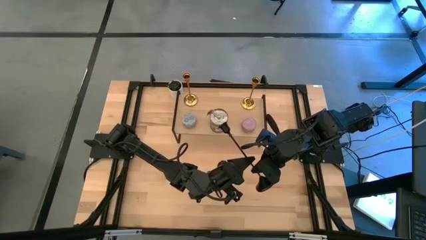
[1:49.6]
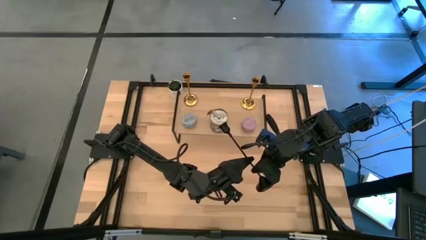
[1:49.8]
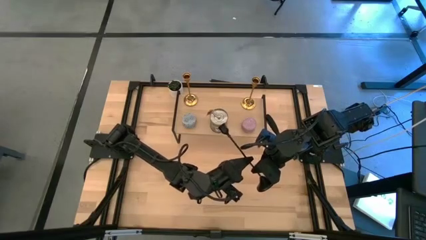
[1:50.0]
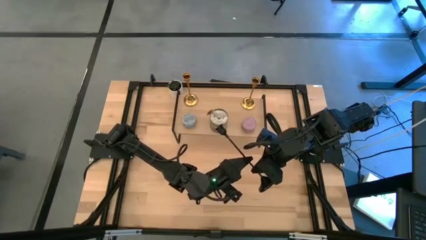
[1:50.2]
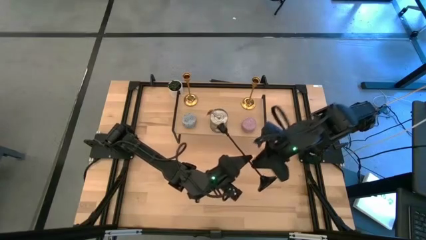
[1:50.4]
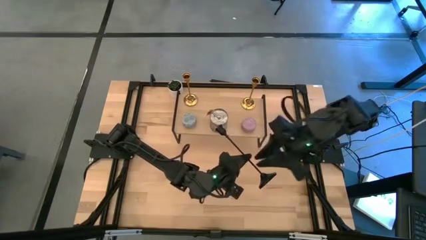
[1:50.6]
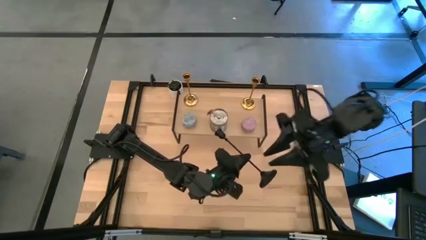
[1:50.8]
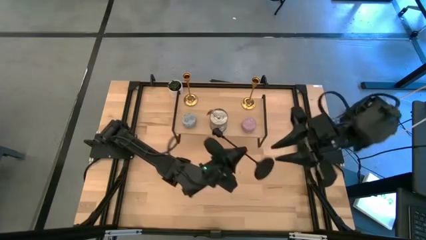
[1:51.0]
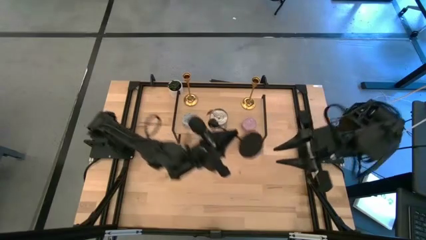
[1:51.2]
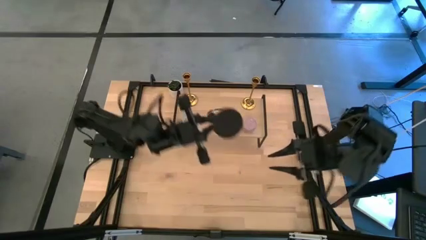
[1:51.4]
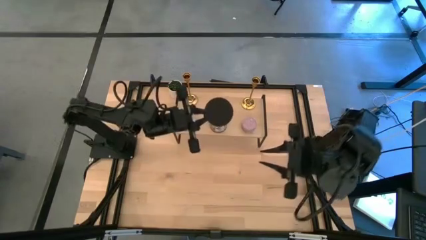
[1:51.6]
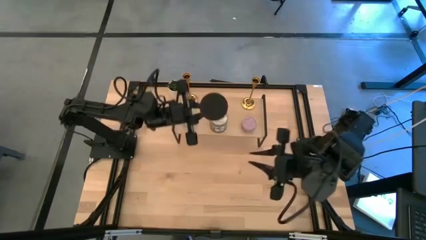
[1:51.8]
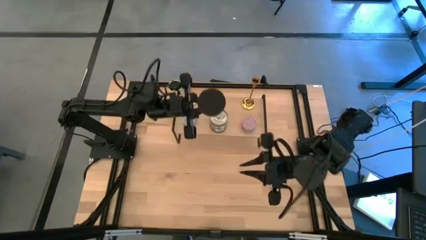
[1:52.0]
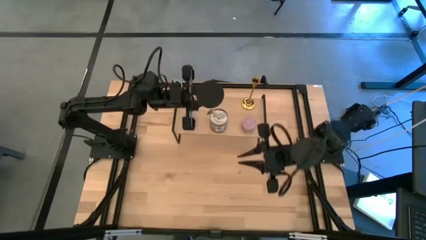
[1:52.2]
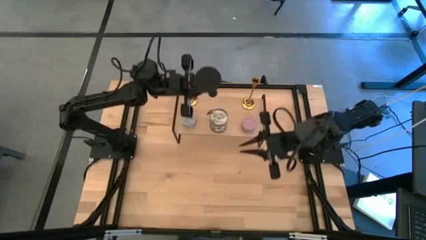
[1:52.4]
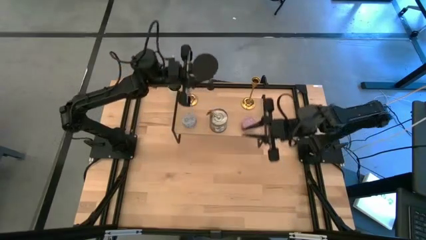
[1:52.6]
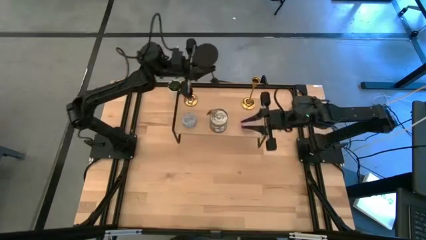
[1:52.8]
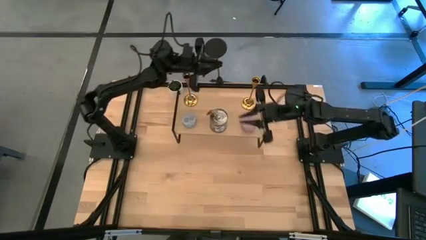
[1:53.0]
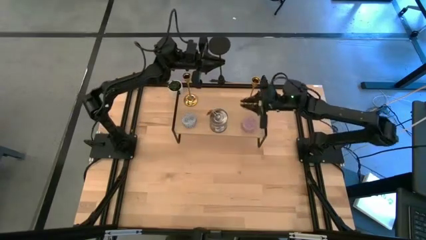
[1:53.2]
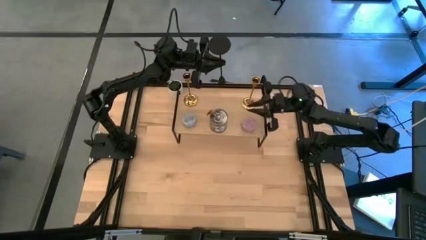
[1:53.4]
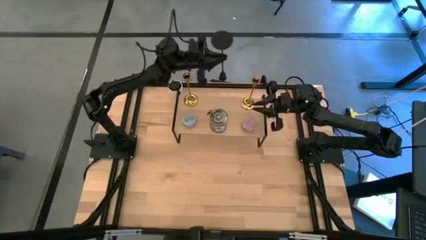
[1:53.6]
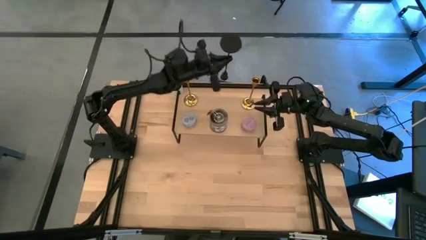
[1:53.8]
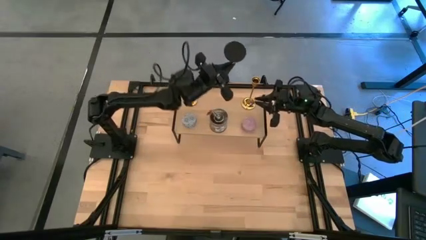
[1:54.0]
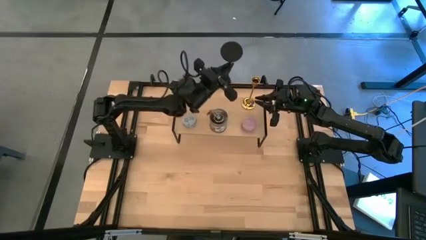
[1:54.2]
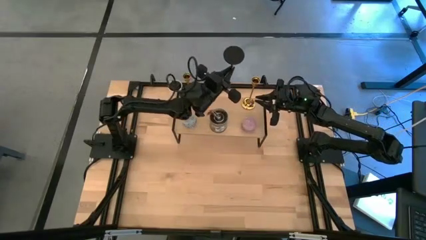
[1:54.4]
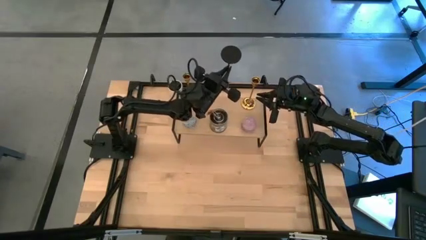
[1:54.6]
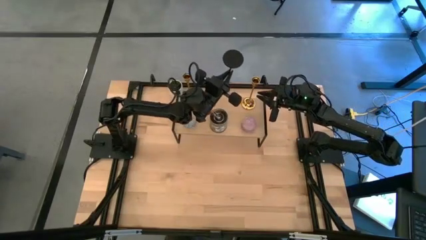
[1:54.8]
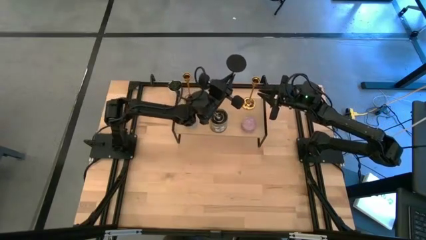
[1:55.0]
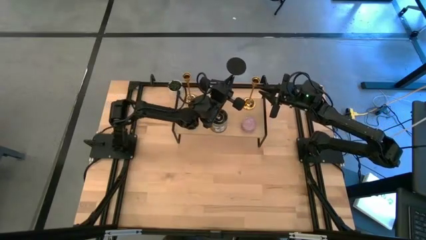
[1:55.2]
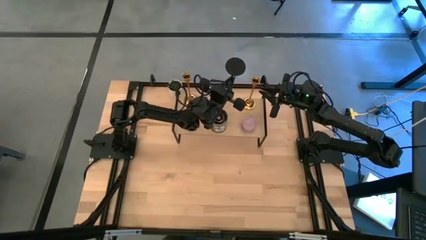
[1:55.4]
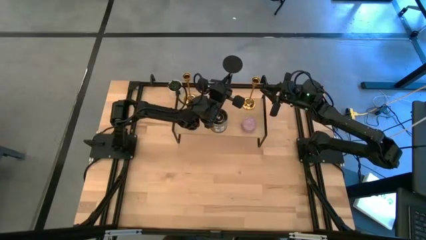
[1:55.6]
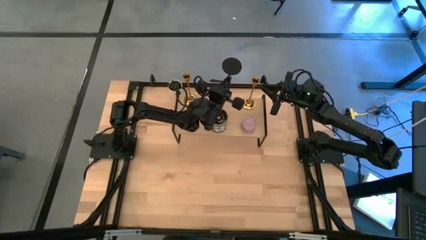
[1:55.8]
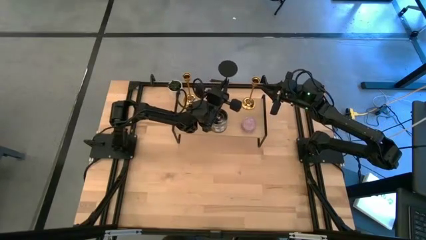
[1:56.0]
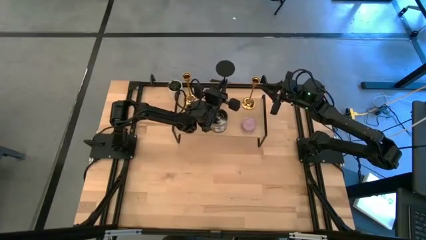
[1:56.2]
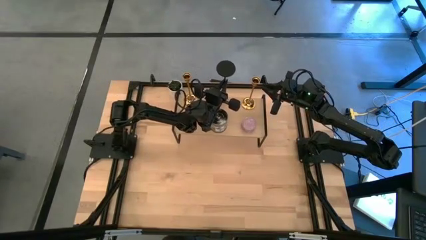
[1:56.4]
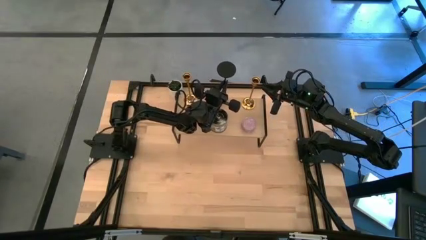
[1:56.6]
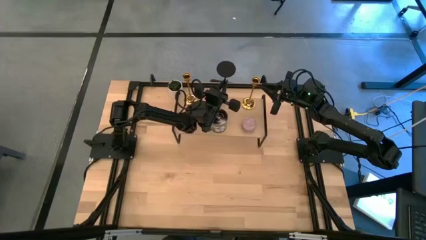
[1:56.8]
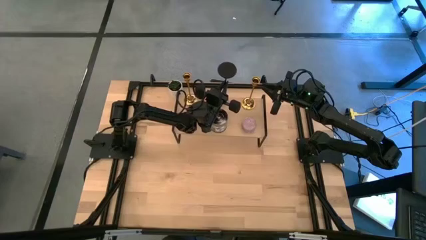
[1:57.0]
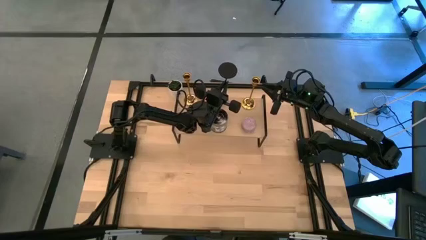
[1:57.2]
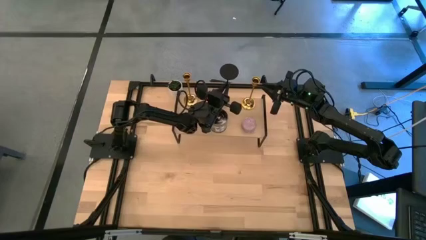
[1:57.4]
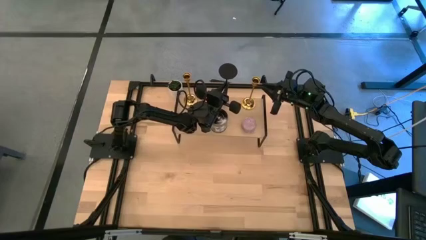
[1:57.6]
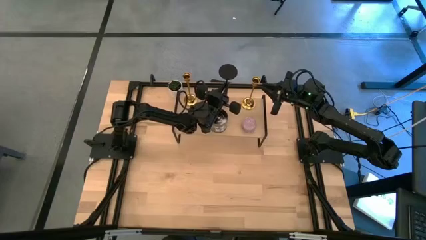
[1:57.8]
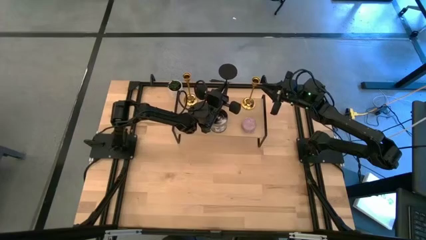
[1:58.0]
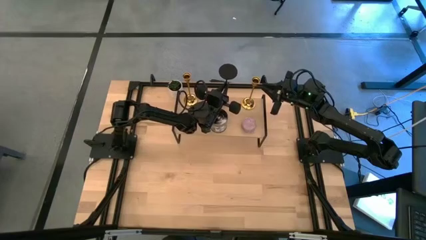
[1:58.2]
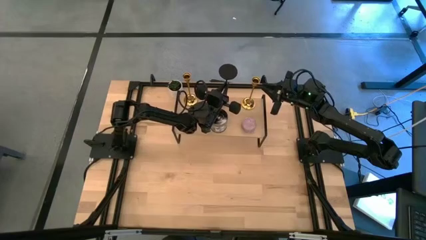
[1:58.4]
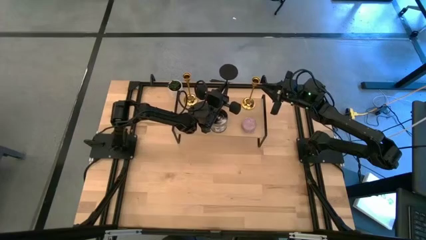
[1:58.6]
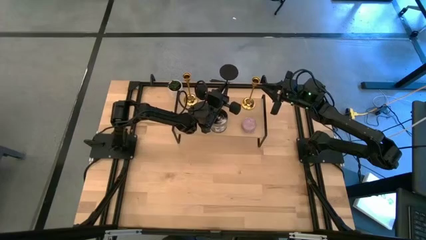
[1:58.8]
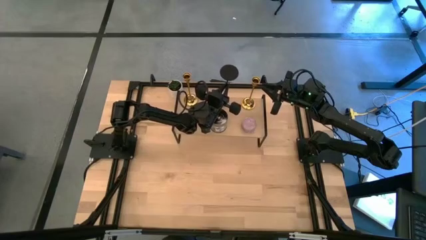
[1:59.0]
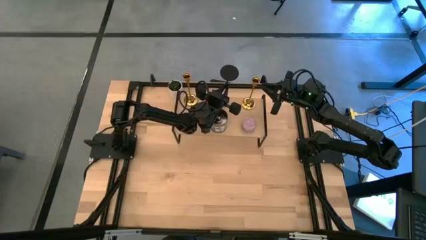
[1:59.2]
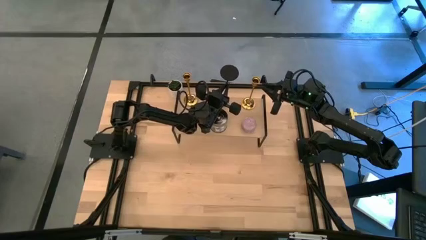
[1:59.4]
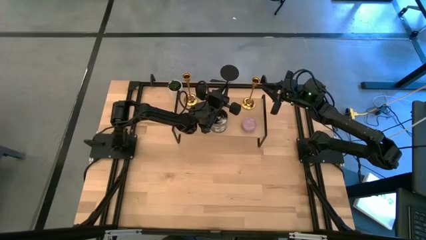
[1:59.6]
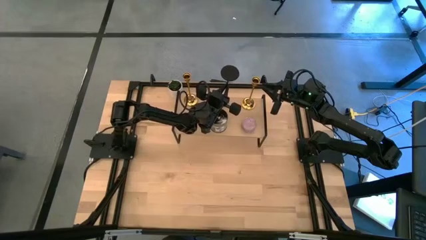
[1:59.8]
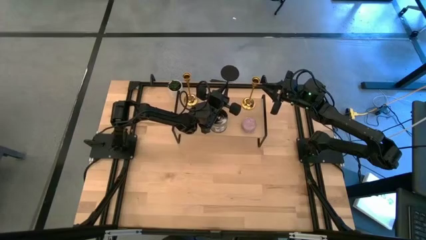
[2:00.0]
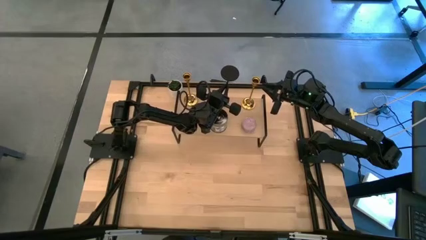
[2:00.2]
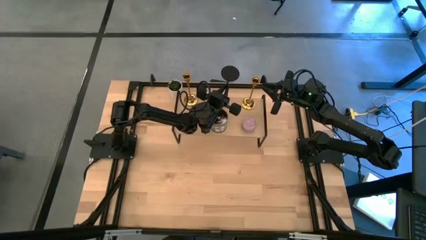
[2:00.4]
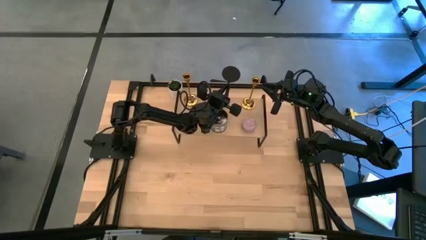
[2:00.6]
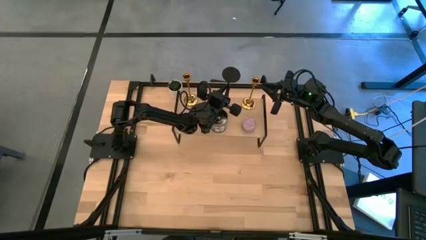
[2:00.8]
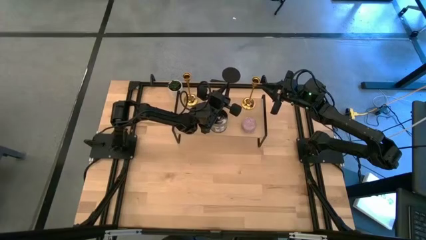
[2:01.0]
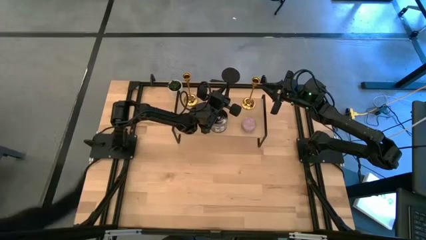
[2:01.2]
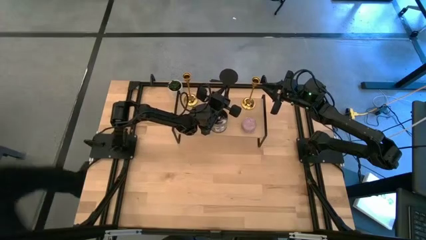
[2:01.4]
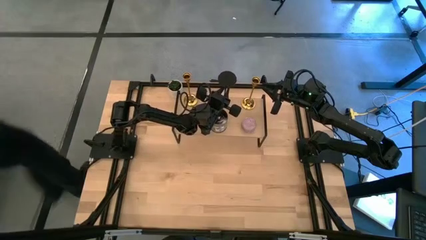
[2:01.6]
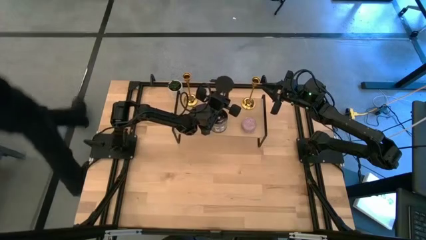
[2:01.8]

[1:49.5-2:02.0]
Task: Pick & Place candle stick holders
Put the black candle holder on the shelf
